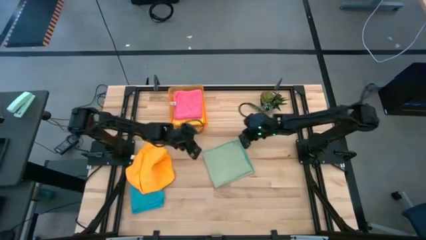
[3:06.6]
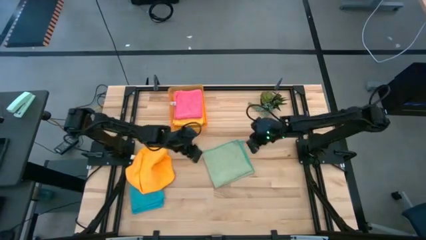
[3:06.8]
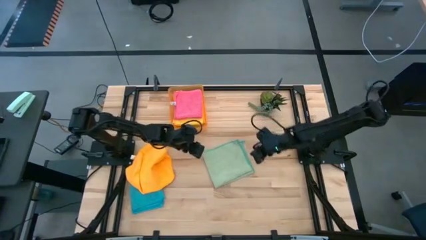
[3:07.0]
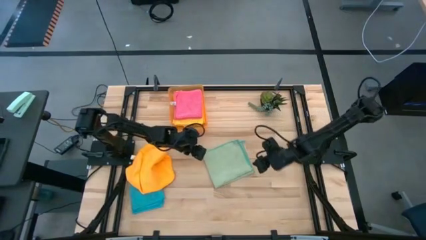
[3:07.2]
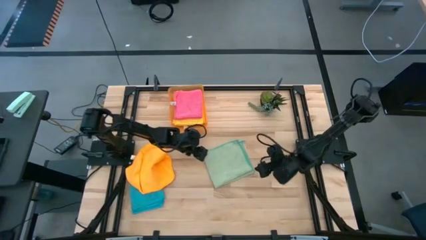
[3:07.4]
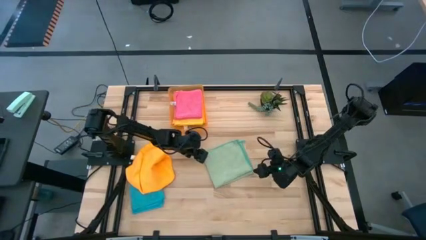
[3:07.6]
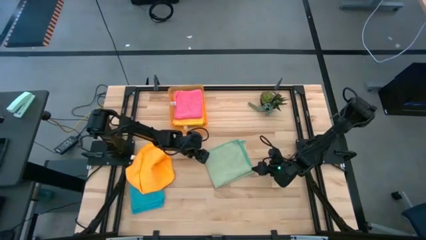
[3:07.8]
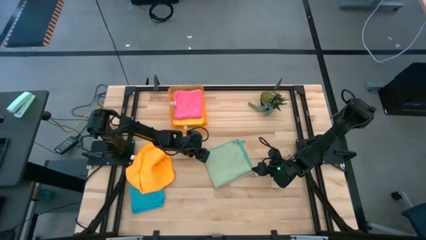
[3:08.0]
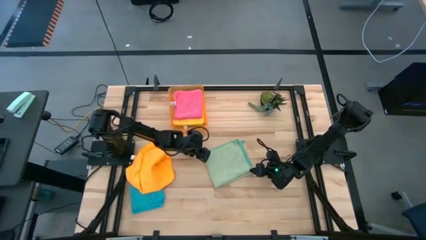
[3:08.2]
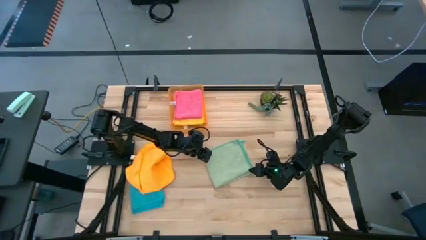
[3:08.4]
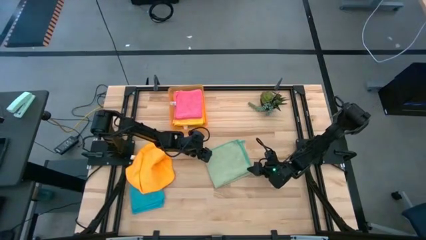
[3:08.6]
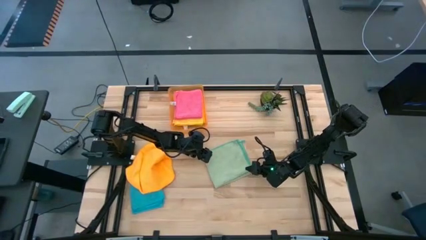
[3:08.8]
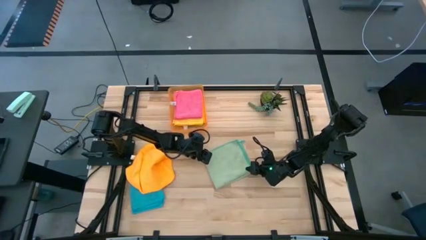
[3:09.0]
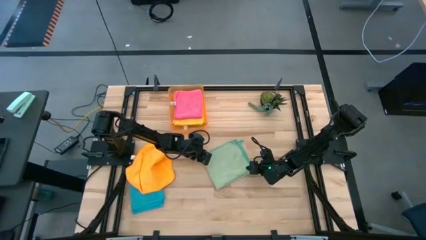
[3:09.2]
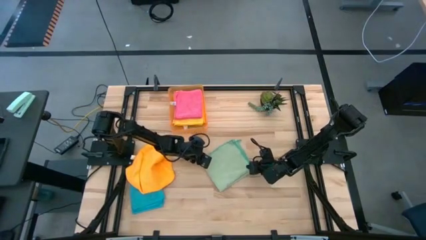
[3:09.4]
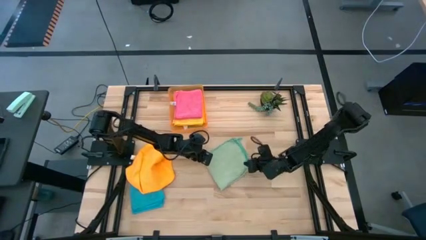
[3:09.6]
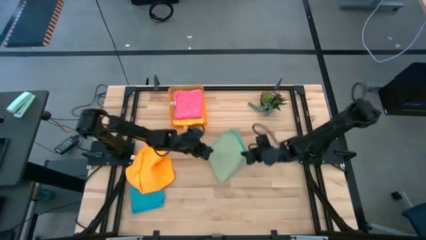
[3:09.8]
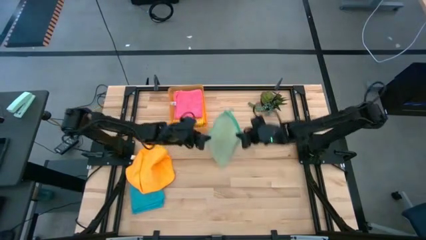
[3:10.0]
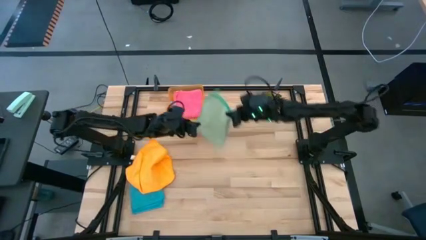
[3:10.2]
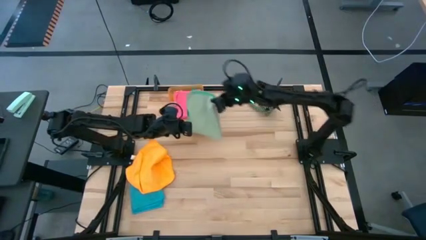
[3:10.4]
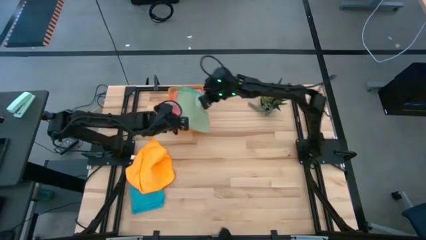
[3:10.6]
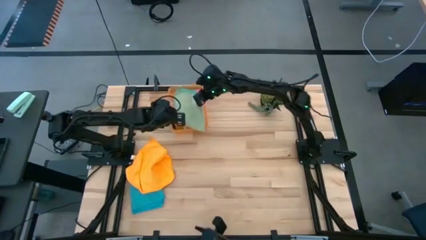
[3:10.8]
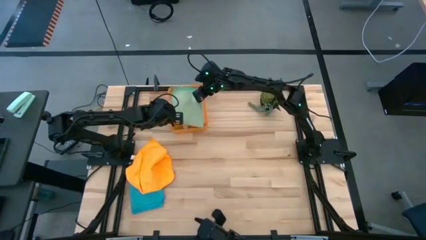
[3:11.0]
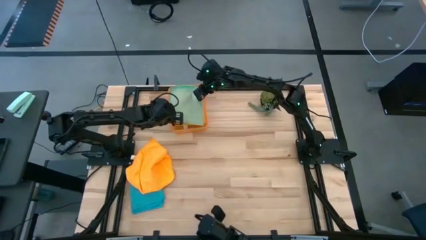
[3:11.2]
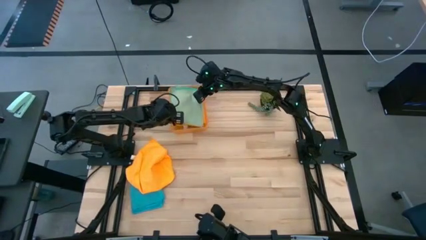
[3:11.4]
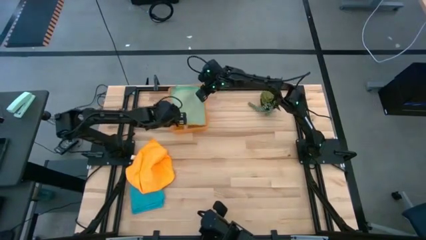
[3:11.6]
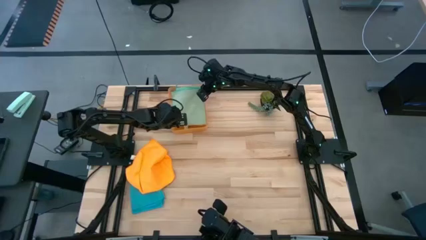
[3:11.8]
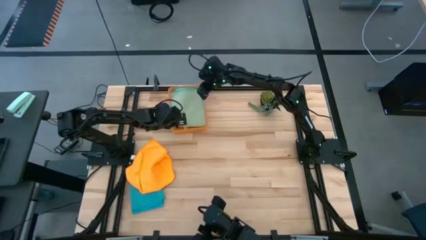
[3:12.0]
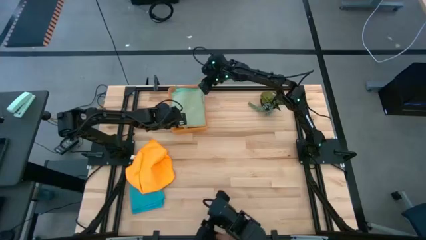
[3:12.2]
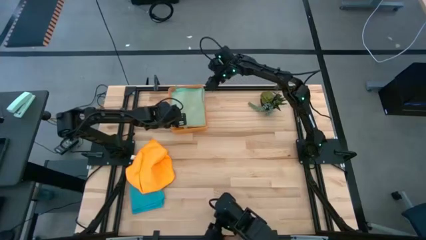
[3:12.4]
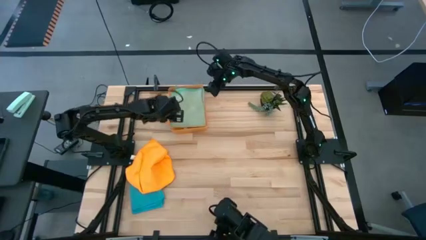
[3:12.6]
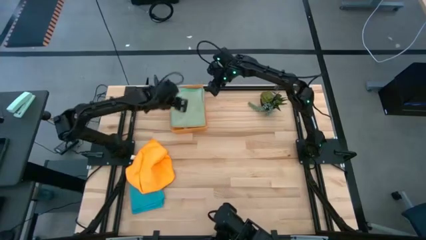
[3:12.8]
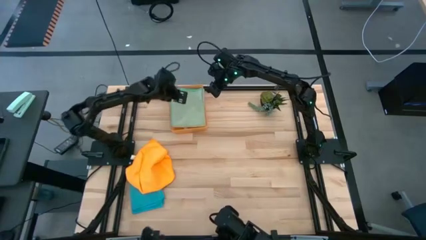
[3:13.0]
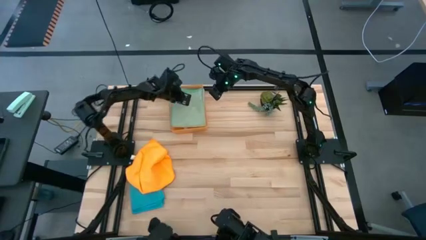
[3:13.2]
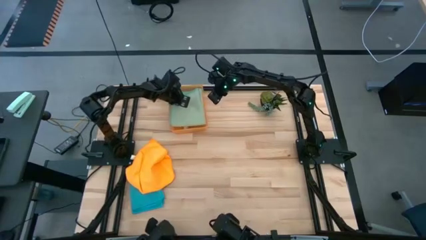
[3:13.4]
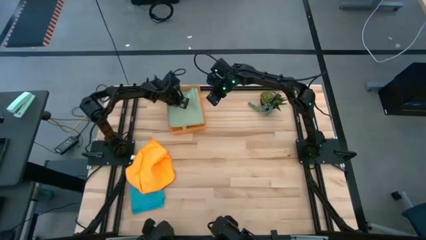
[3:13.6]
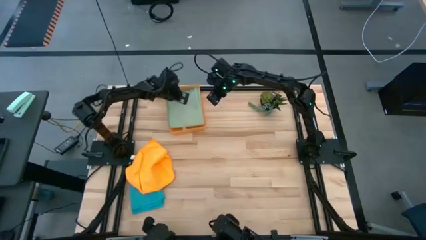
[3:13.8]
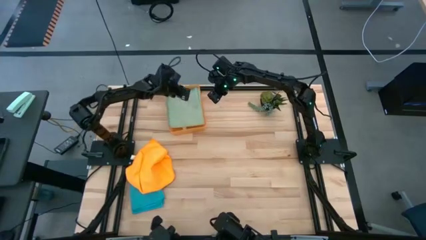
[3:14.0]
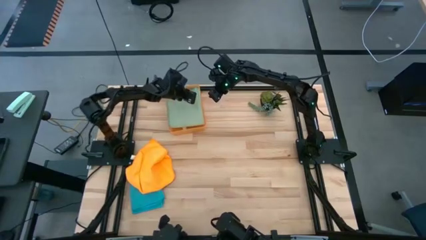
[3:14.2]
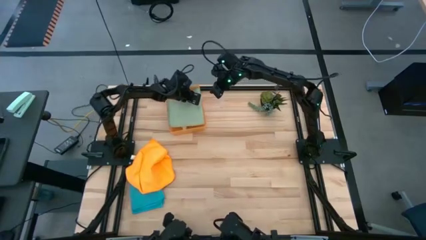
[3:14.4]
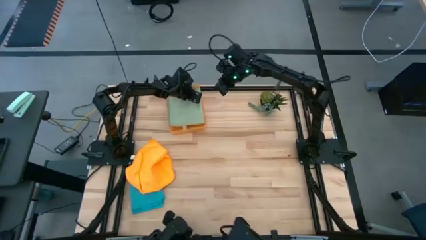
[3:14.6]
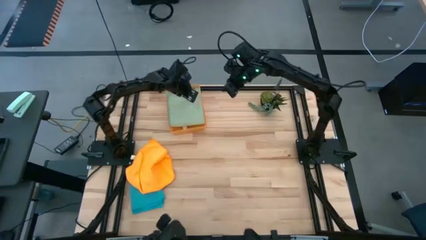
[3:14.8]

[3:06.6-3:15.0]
Task: Fold microfiber towels
Put the green microfiber cloth into the orange bin

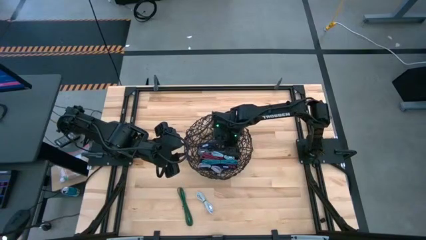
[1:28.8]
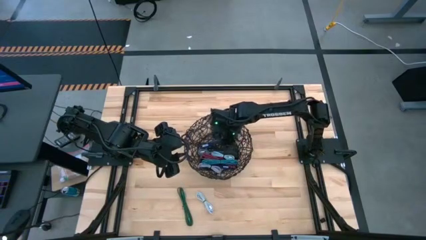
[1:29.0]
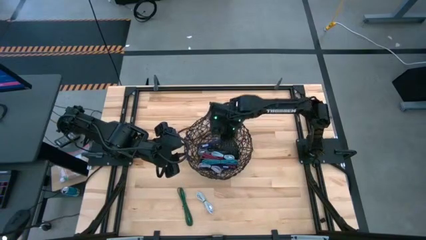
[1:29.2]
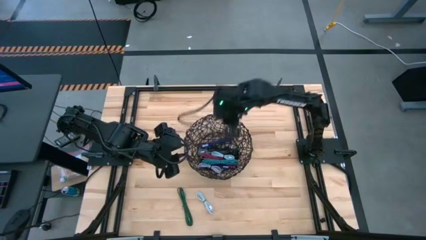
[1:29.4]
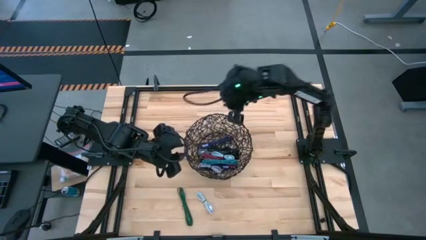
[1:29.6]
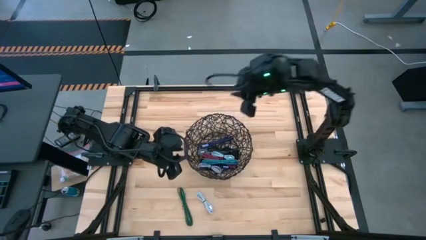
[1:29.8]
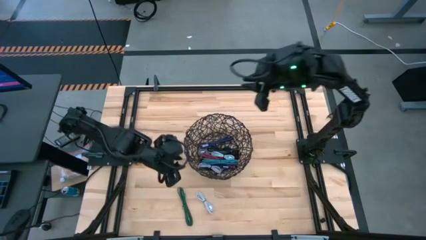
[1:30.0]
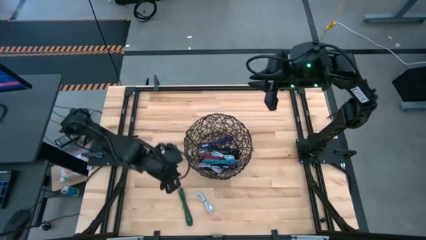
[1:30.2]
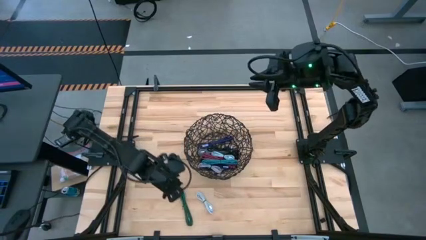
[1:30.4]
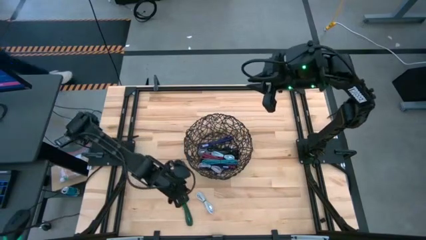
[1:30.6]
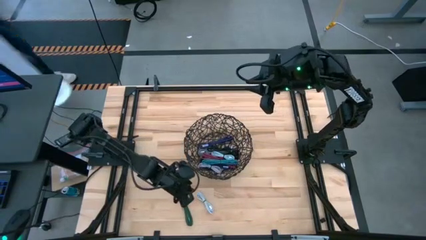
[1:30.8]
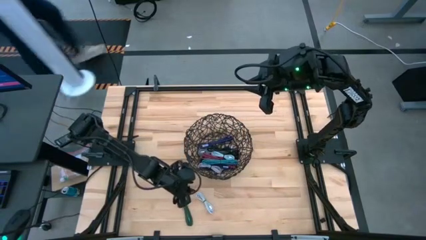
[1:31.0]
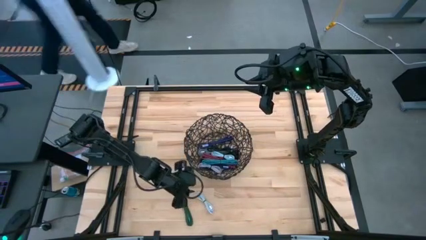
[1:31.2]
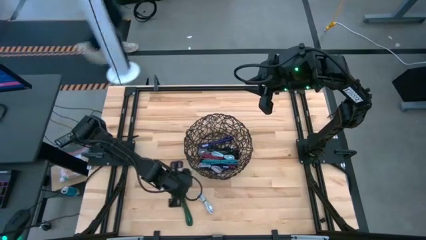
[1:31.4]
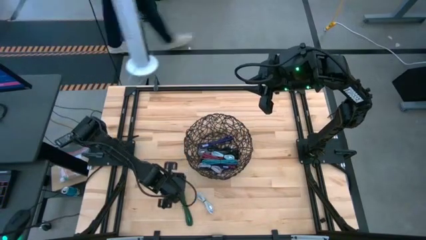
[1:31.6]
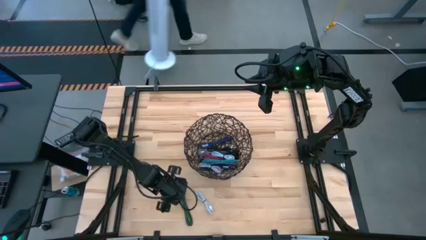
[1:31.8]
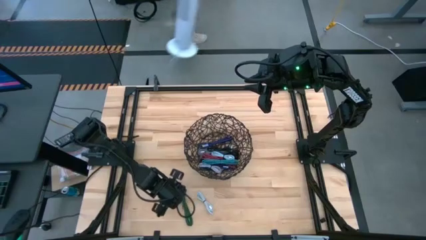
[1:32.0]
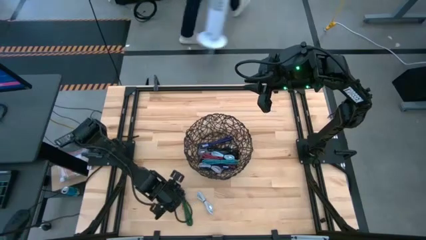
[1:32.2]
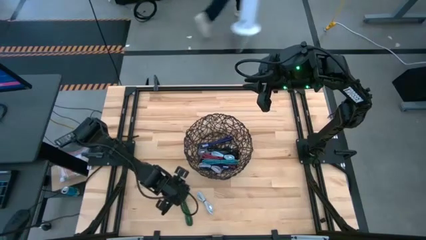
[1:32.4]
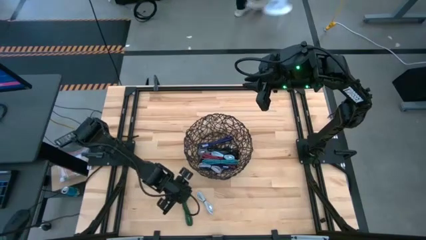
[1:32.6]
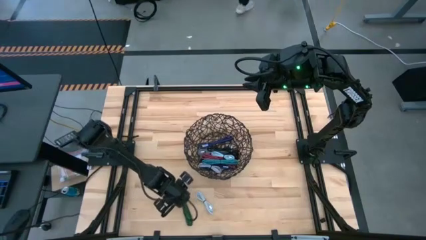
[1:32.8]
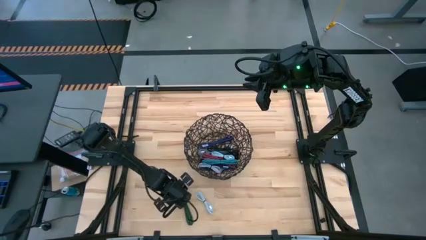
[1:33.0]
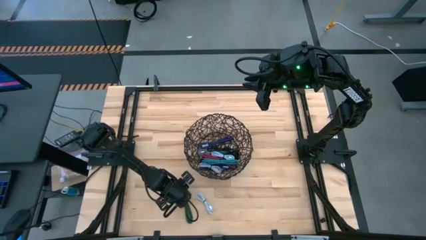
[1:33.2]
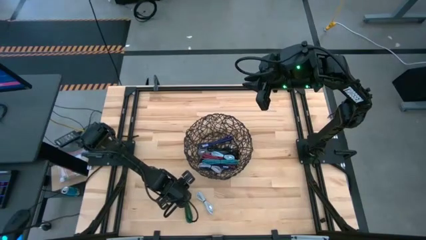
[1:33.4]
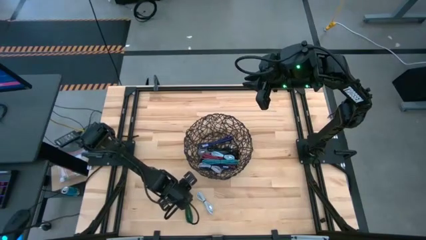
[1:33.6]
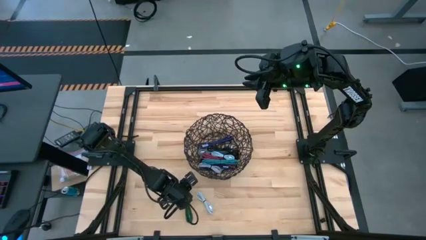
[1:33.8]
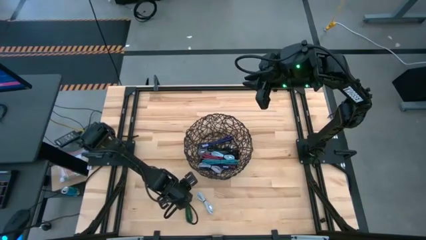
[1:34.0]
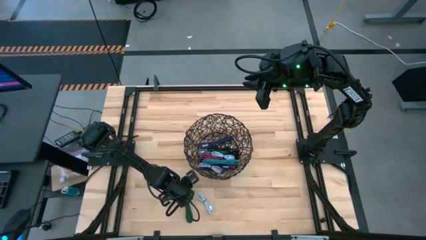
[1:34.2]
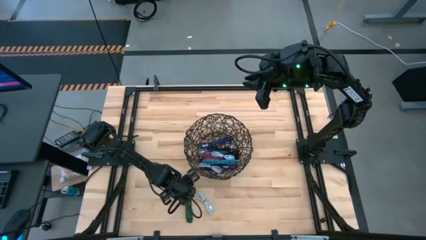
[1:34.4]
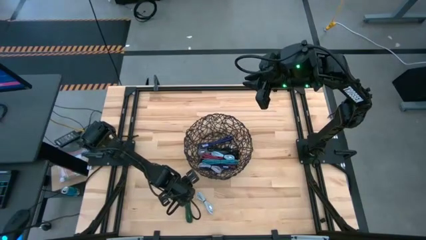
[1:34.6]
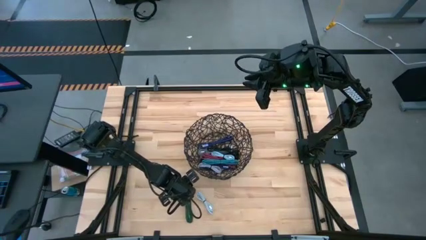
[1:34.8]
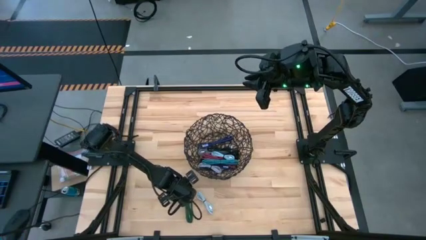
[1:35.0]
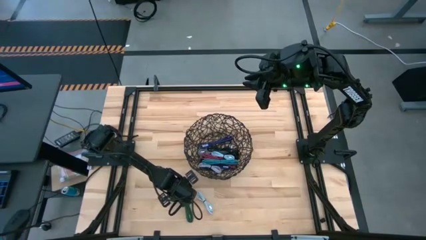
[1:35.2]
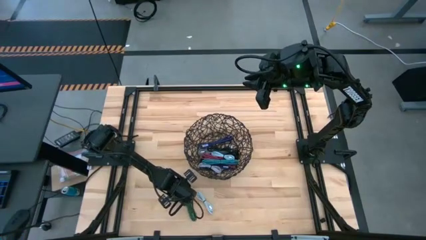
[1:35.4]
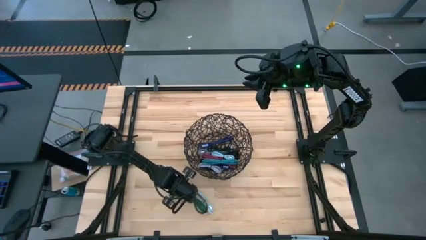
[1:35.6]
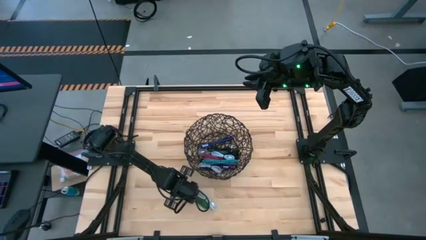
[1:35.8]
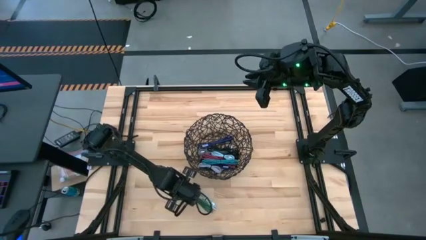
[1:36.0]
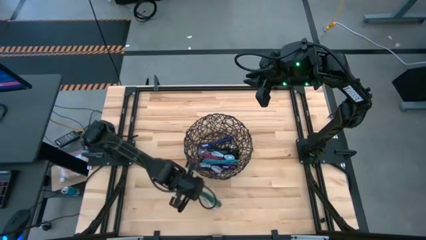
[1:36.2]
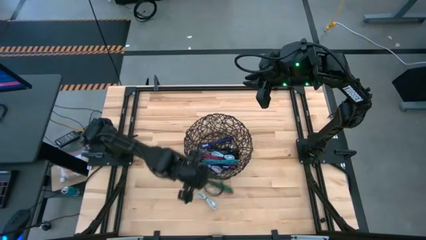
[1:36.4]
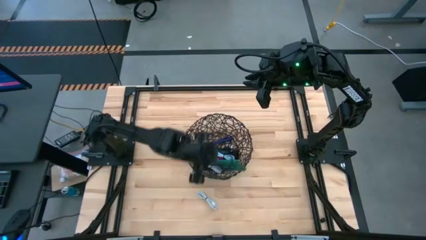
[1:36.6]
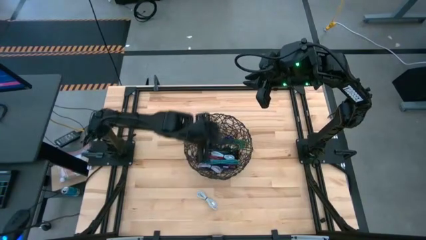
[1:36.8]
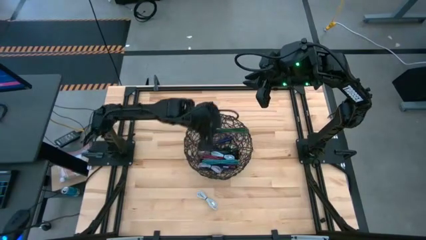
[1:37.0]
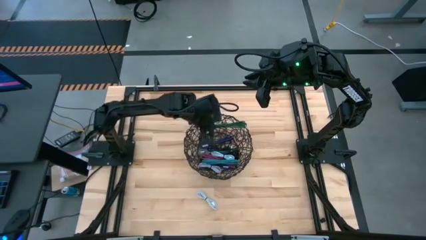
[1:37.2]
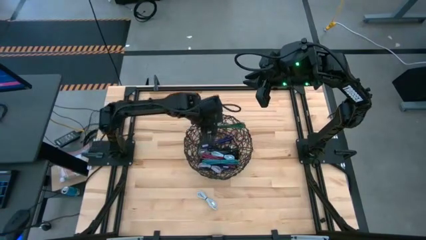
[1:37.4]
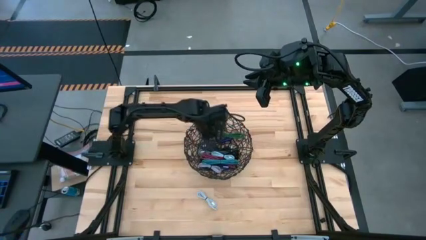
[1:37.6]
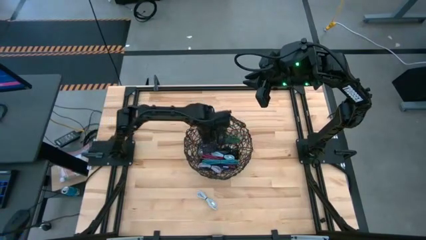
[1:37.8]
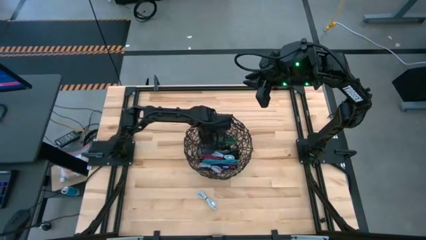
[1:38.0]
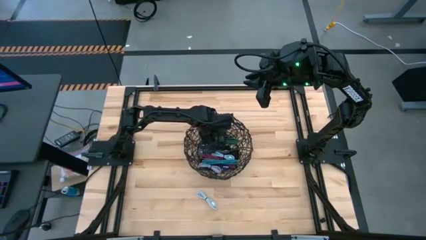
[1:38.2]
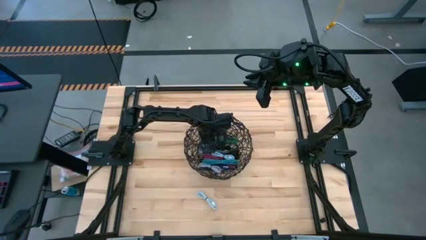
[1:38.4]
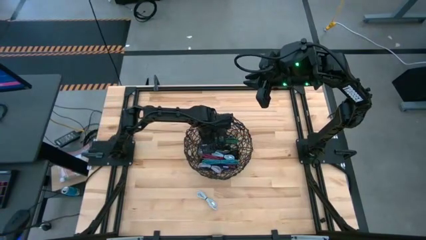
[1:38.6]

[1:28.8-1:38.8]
Task: Pick and place USB-C Cables
Put the green charger cable into the black mesh basket
